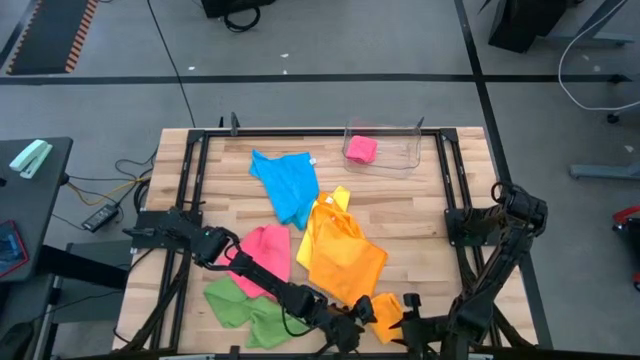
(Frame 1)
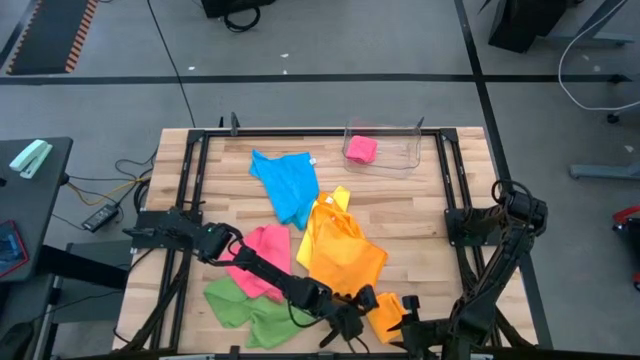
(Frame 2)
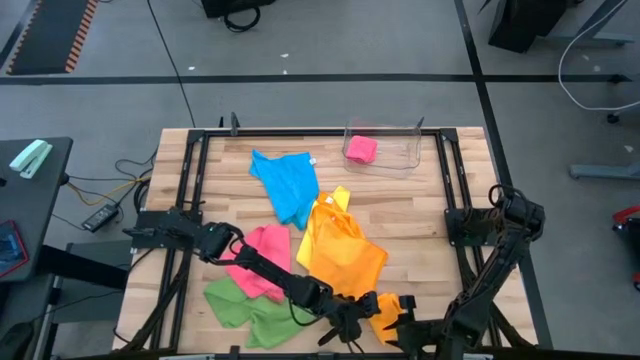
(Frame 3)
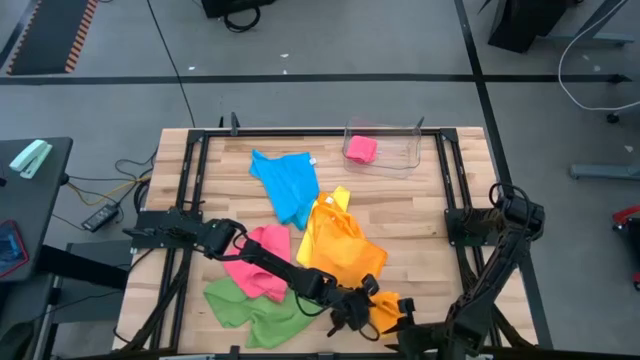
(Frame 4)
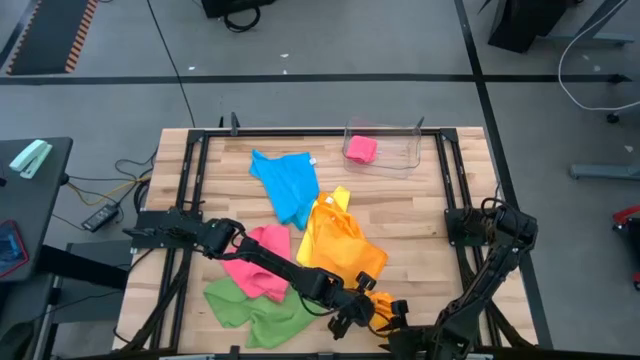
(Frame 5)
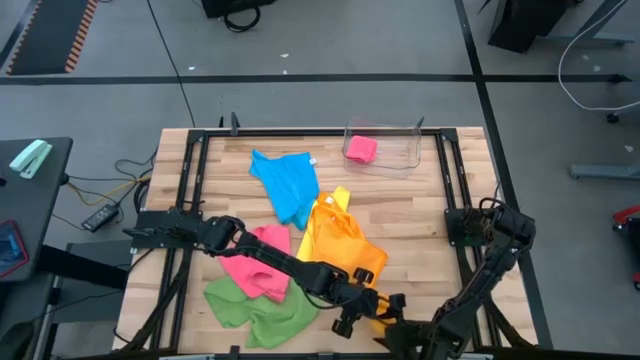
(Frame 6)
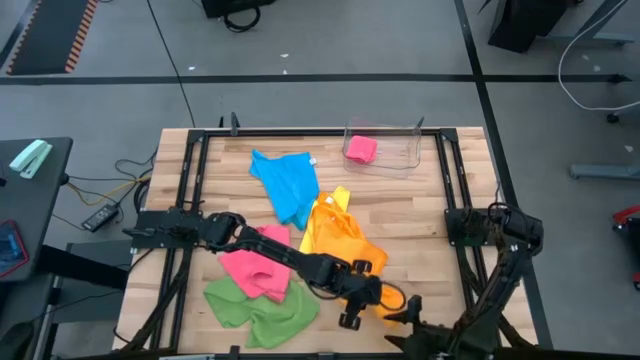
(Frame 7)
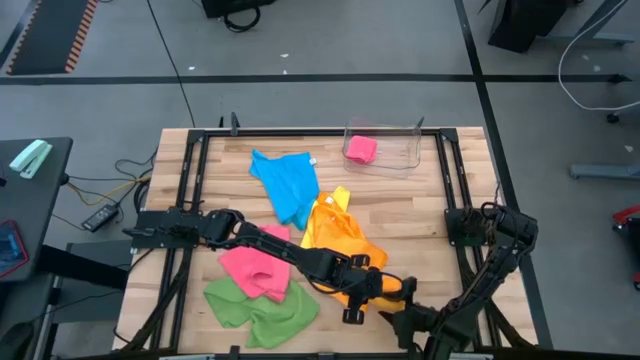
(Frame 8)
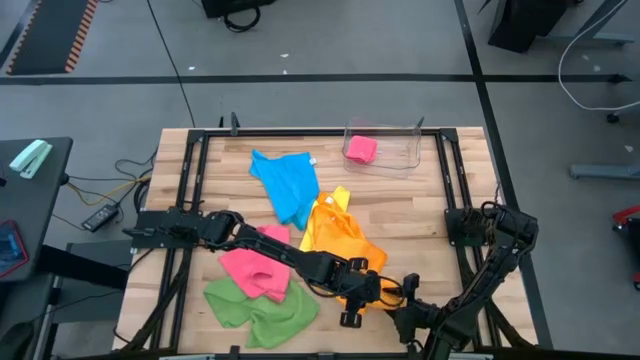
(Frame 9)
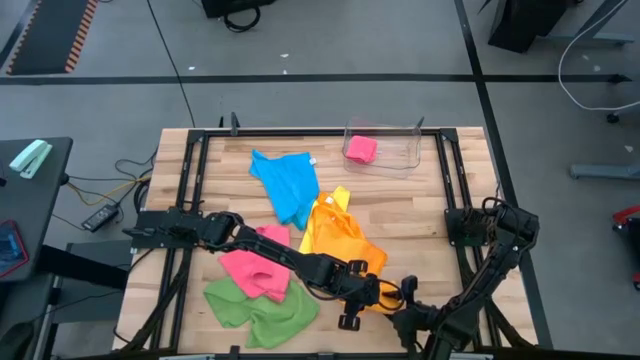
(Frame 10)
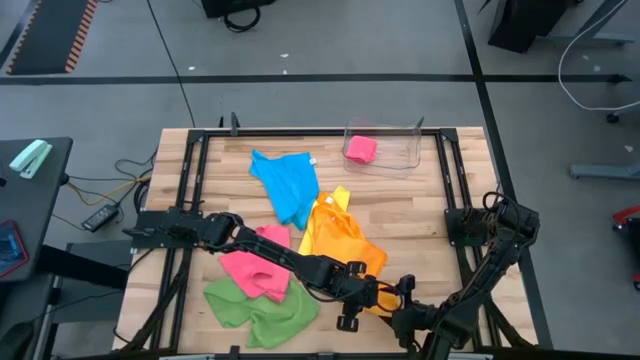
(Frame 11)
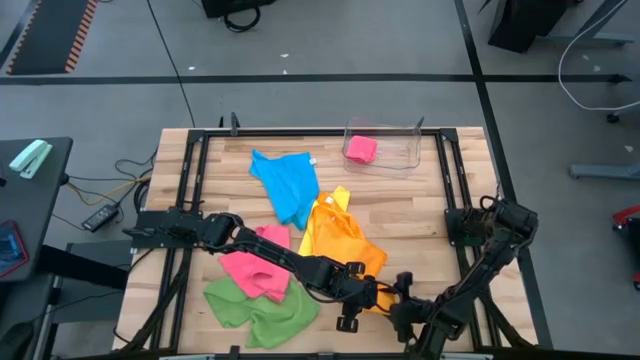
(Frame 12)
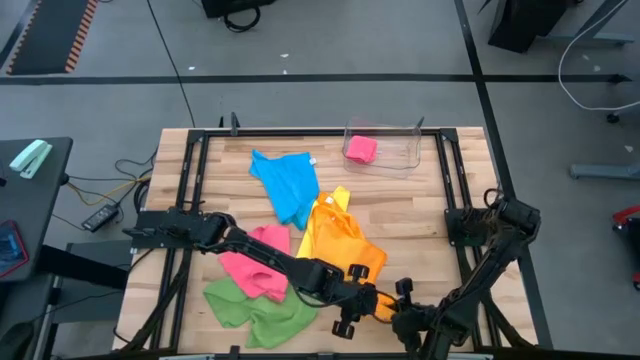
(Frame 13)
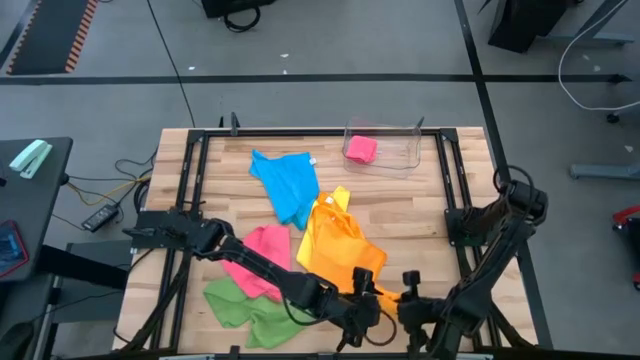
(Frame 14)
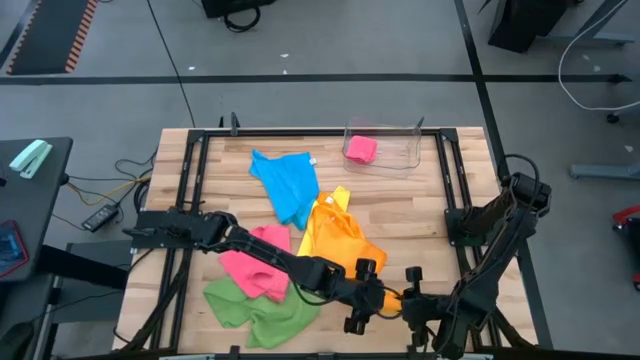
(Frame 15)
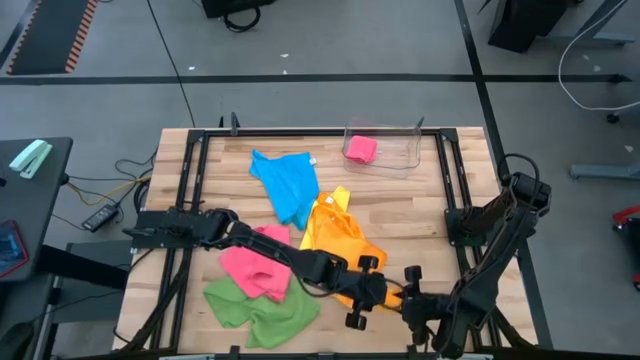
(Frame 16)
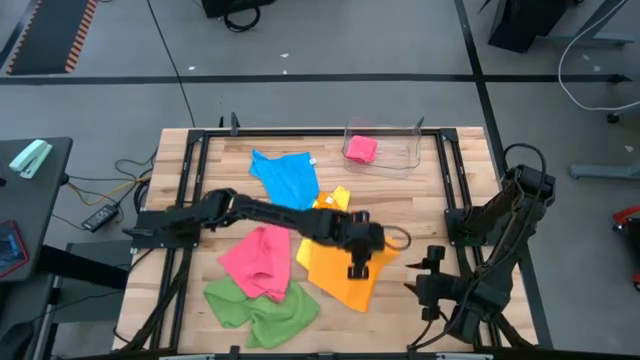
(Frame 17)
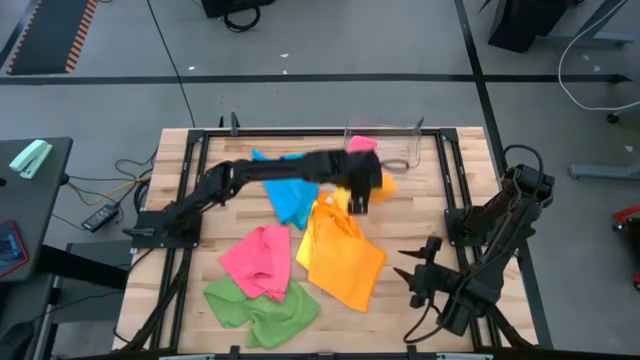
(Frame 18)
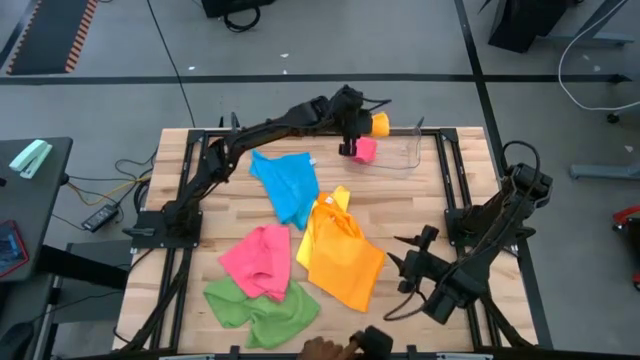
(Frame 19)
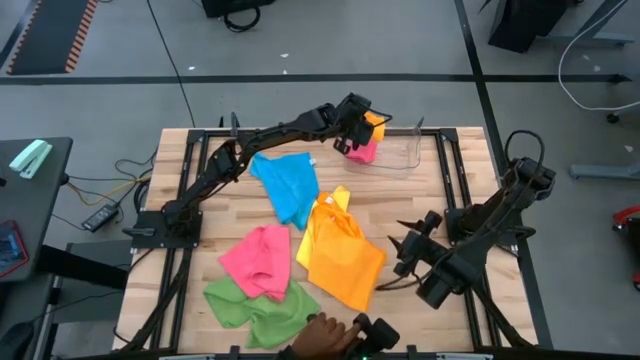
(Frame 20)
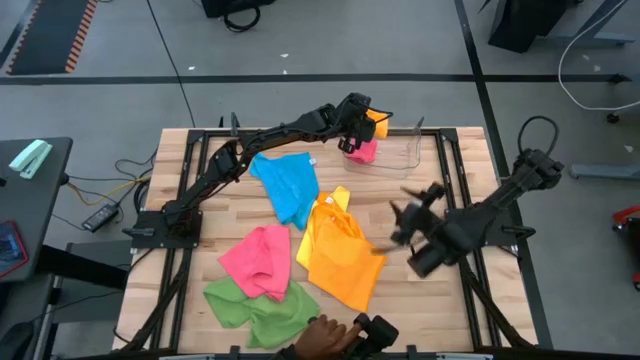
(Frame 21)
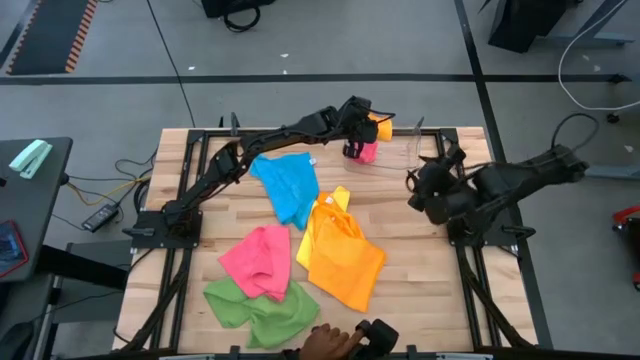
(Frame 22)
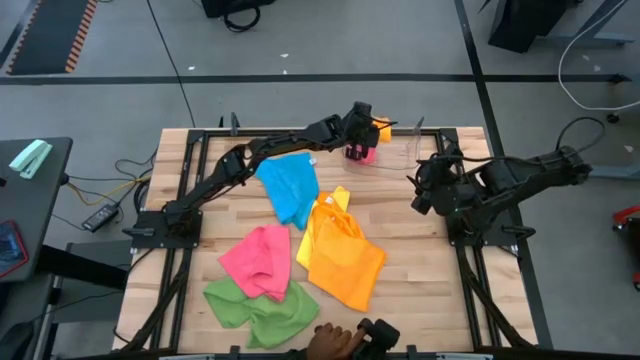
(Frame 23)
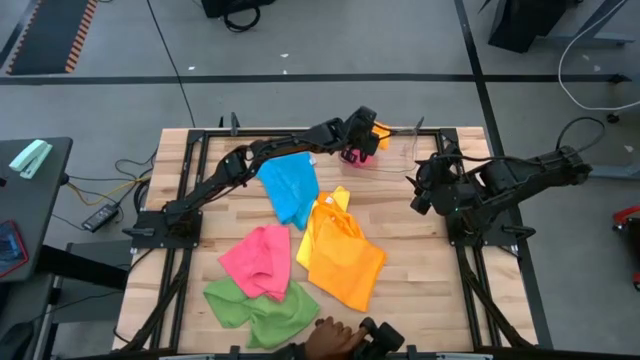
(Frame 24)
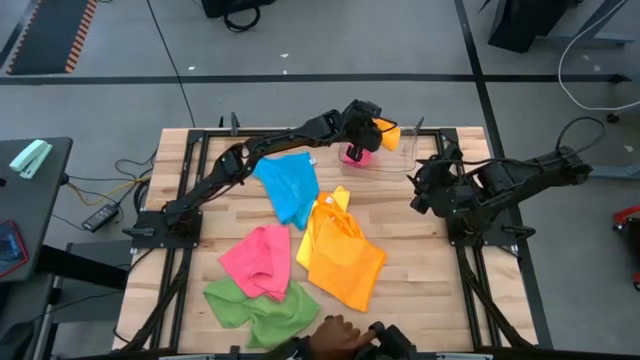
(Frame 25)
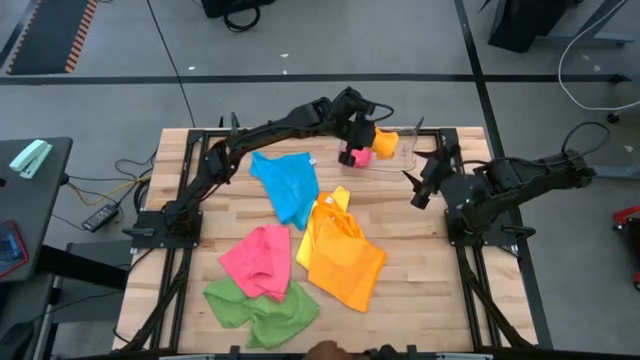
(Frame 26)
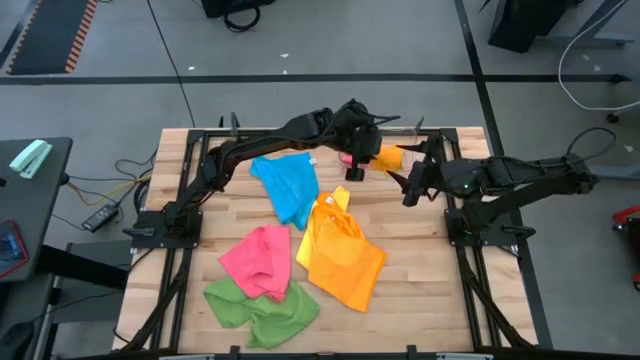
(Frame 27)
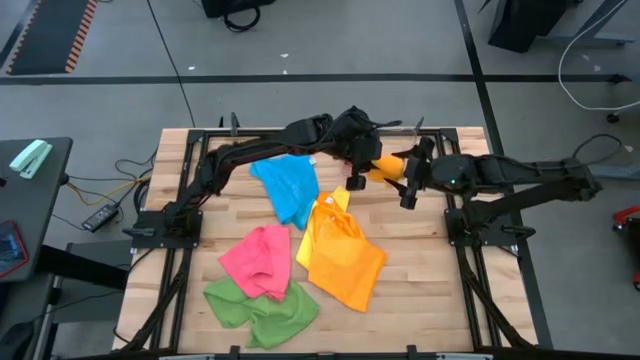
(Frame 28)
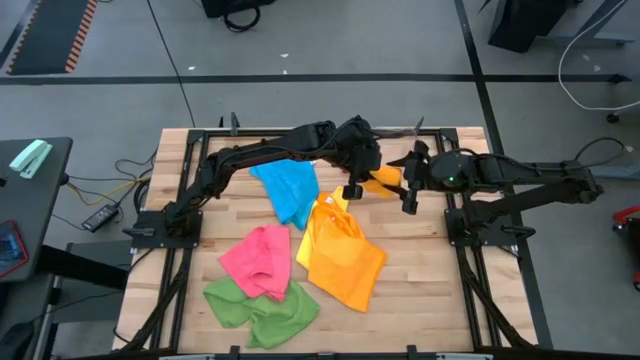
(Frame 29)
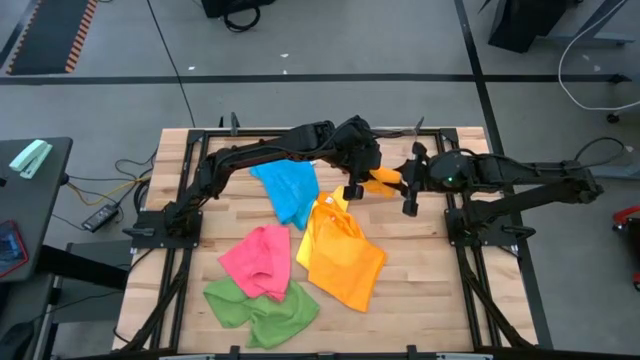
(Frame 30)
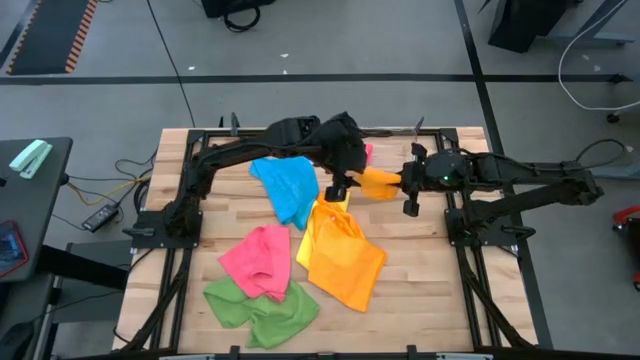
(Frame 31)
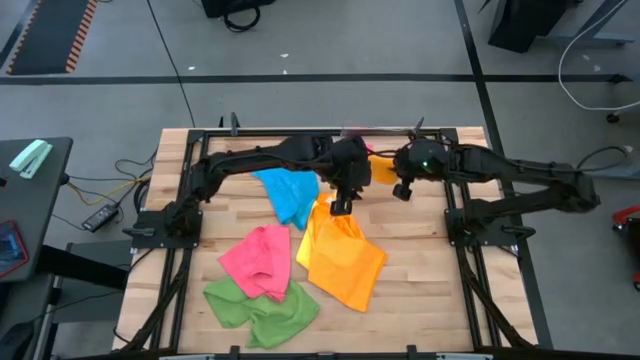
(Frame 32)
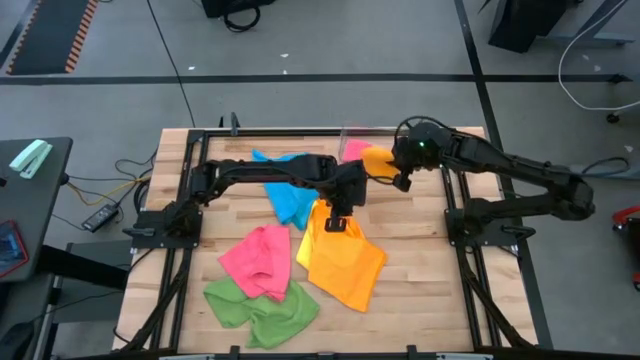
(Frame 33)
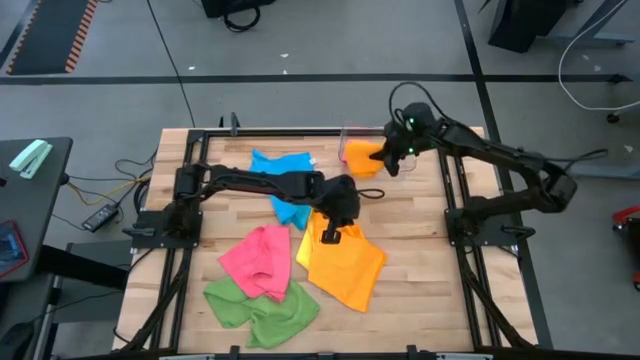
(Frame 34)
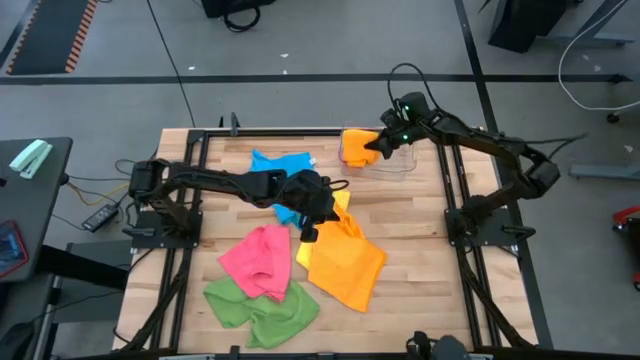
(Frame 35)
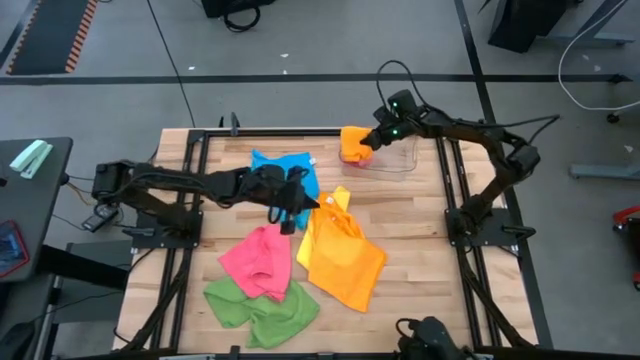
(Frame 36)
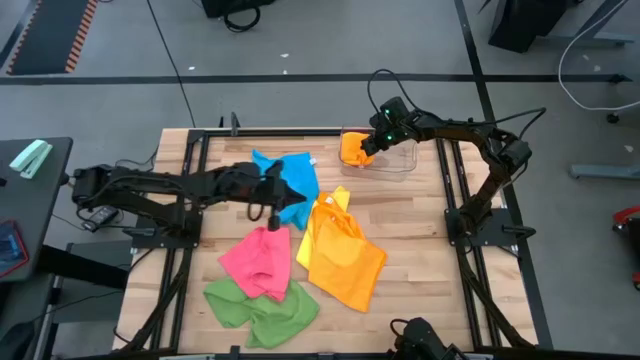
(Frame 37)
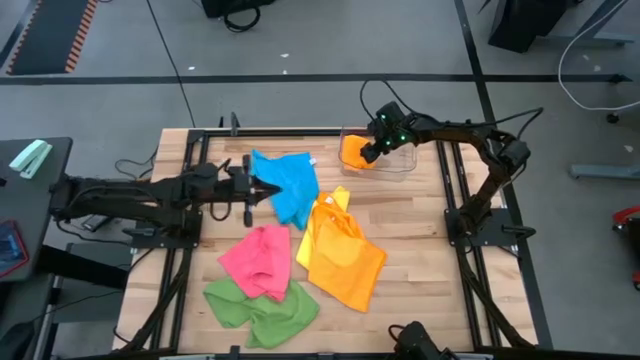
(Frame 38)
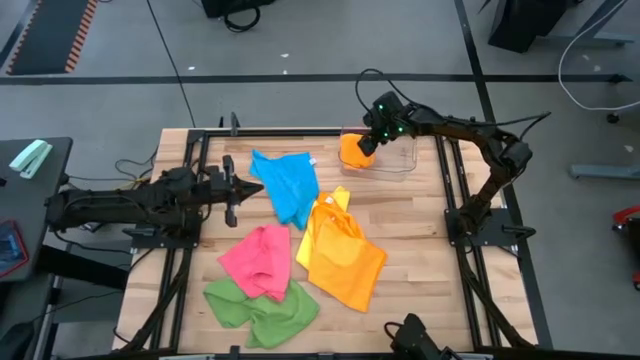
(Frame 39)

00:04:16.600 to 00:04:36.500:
Task: Fold microfiber towels
Stack the folded right orange microfiber cloth on top of the folded pink microfiber cloth
